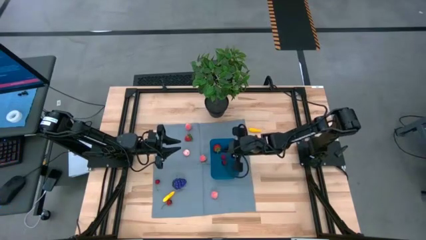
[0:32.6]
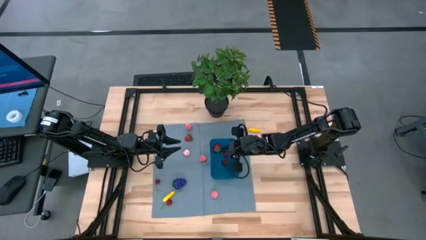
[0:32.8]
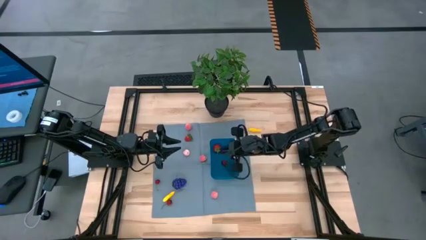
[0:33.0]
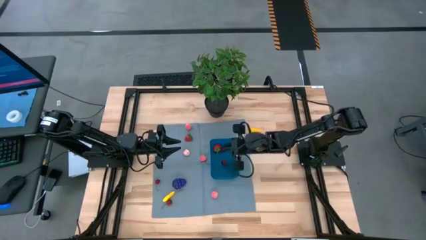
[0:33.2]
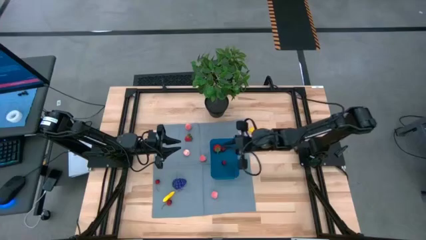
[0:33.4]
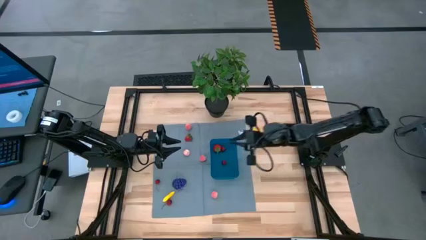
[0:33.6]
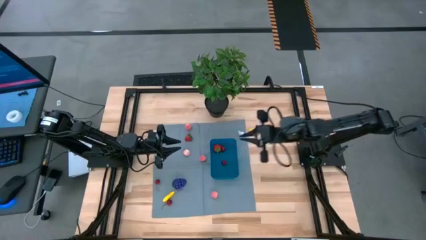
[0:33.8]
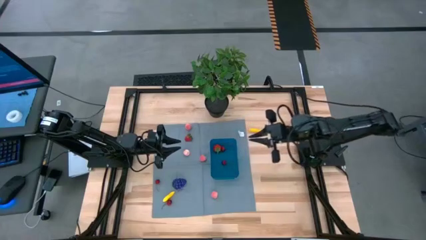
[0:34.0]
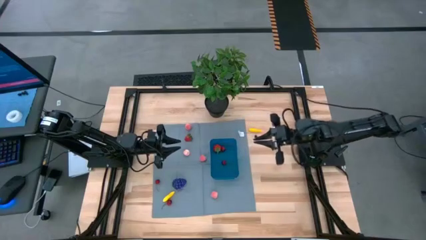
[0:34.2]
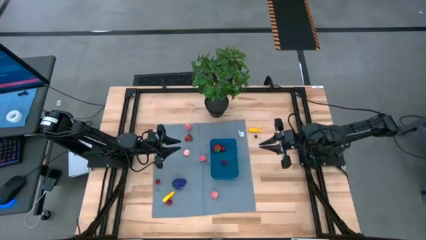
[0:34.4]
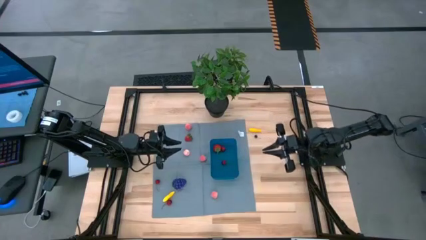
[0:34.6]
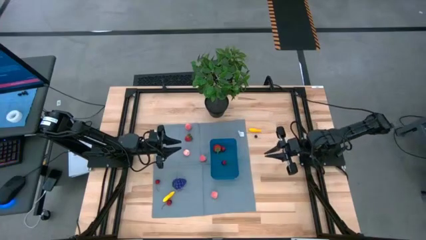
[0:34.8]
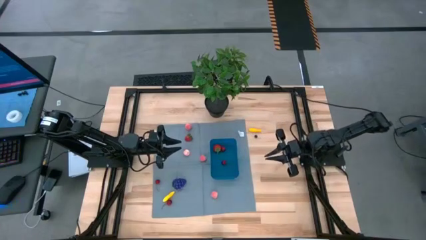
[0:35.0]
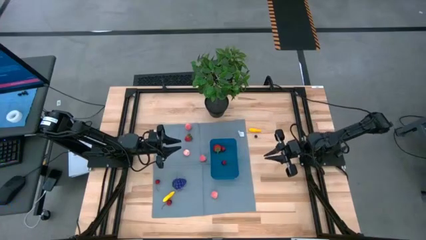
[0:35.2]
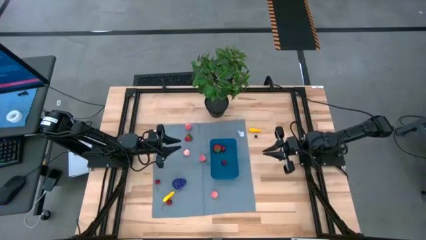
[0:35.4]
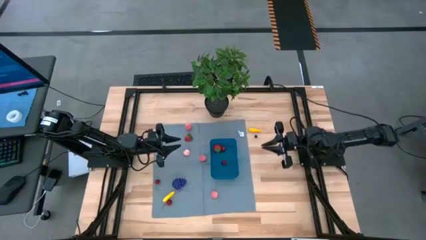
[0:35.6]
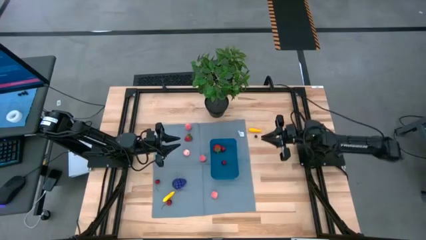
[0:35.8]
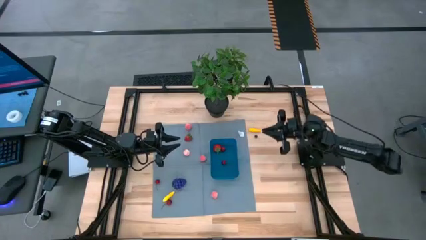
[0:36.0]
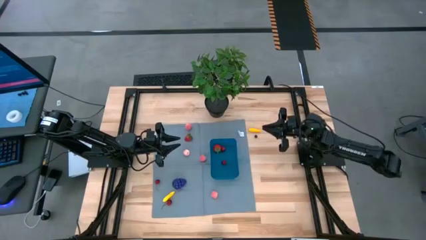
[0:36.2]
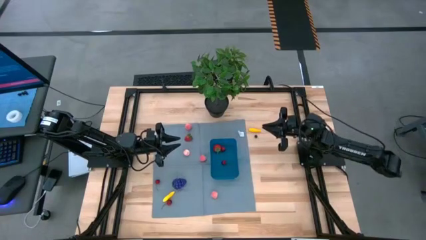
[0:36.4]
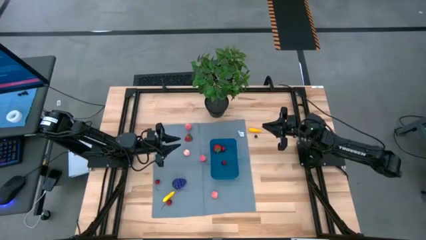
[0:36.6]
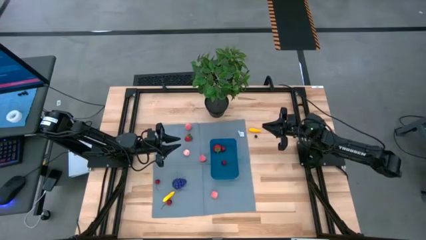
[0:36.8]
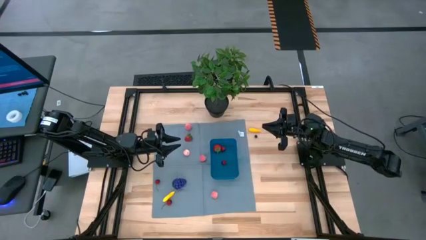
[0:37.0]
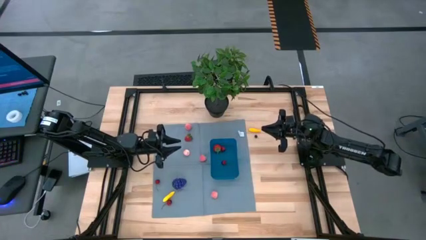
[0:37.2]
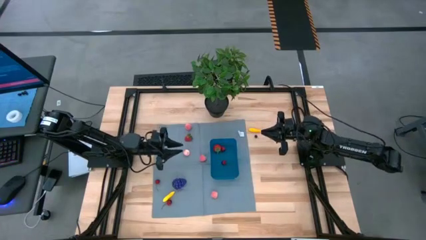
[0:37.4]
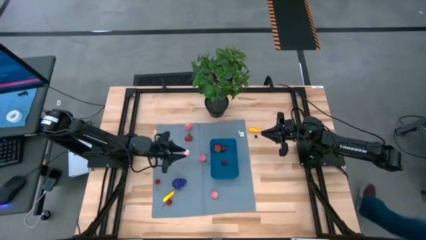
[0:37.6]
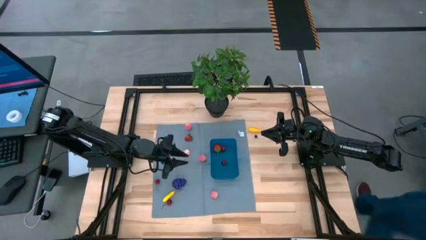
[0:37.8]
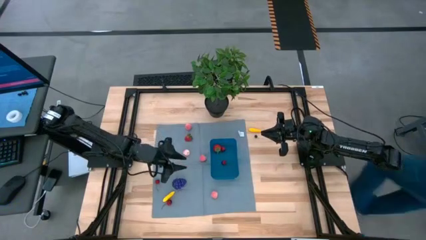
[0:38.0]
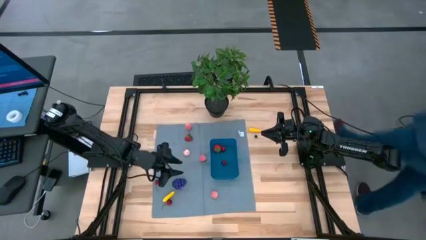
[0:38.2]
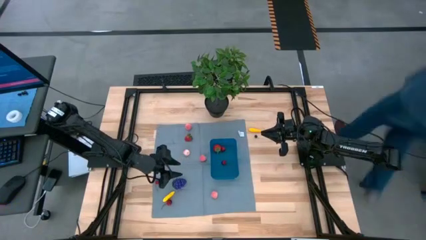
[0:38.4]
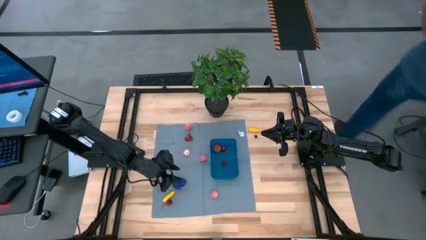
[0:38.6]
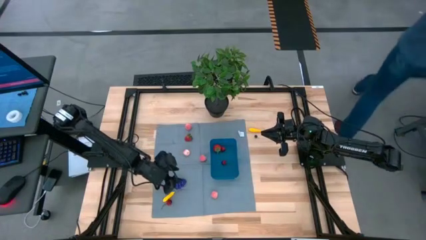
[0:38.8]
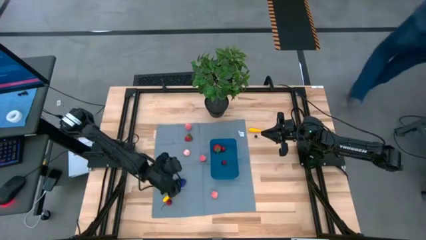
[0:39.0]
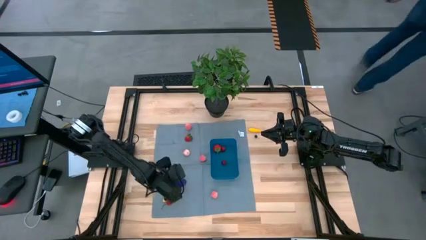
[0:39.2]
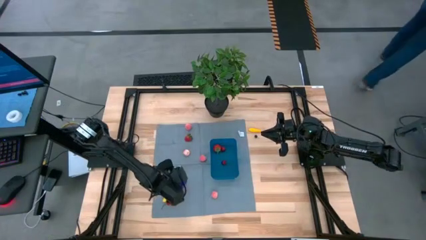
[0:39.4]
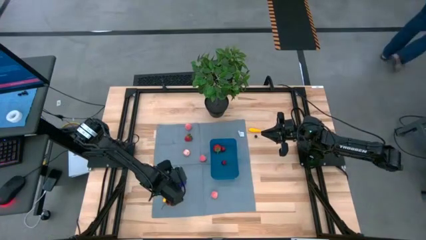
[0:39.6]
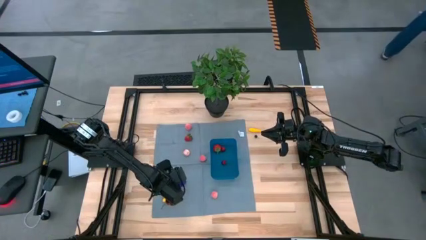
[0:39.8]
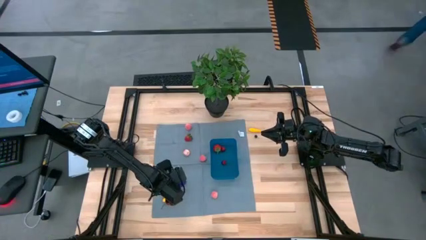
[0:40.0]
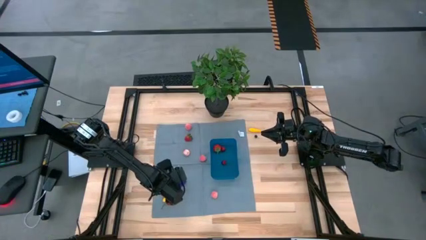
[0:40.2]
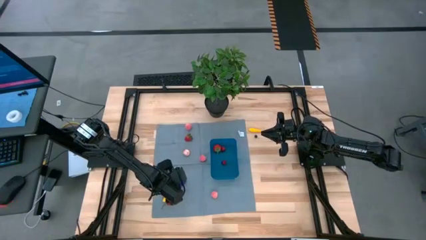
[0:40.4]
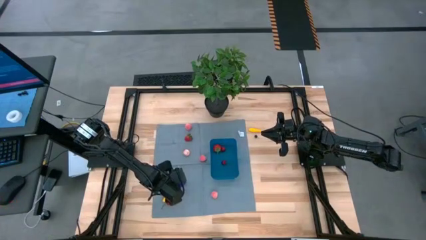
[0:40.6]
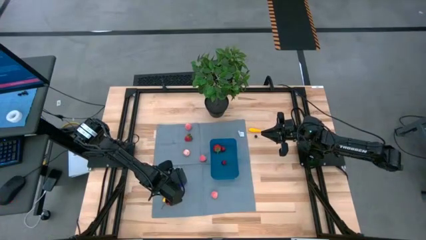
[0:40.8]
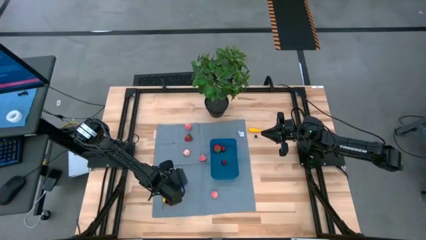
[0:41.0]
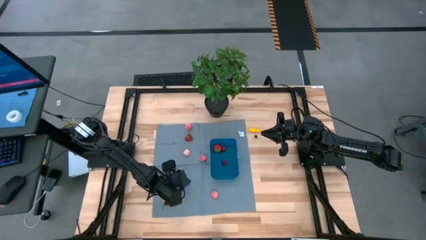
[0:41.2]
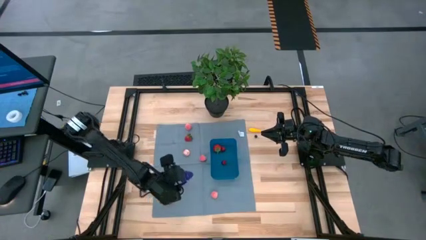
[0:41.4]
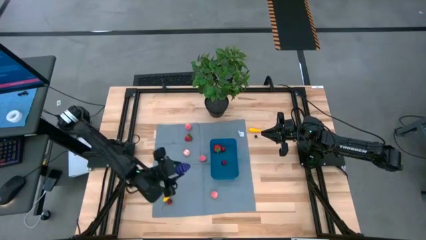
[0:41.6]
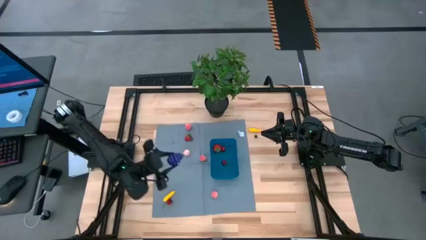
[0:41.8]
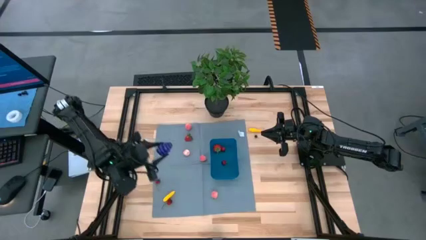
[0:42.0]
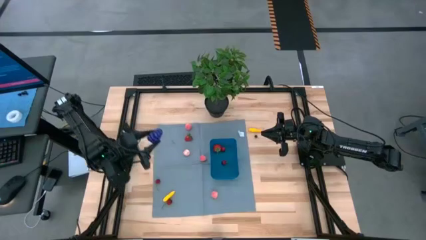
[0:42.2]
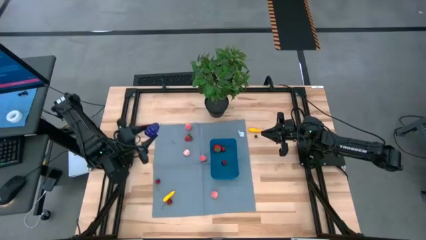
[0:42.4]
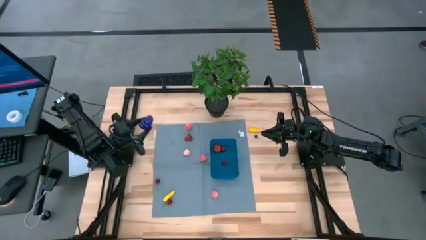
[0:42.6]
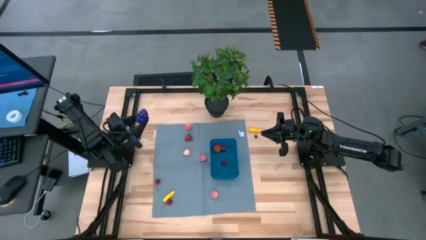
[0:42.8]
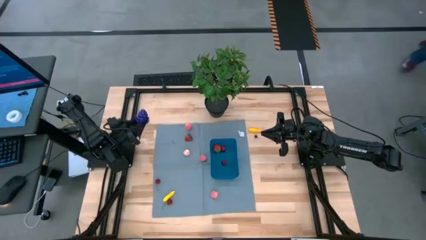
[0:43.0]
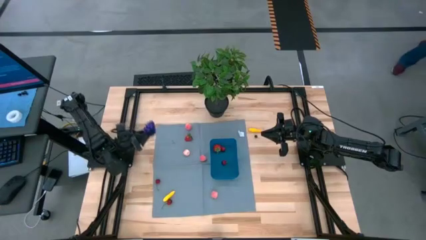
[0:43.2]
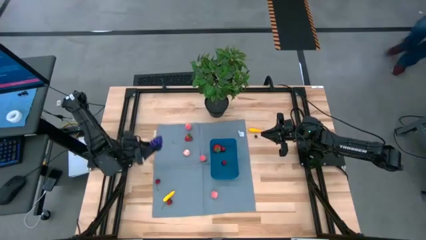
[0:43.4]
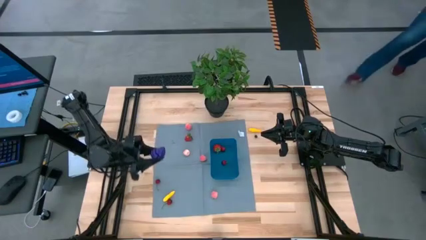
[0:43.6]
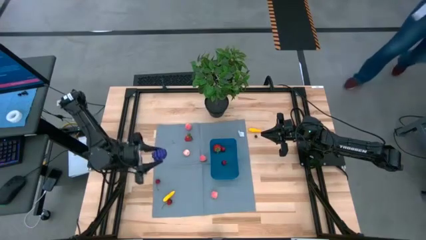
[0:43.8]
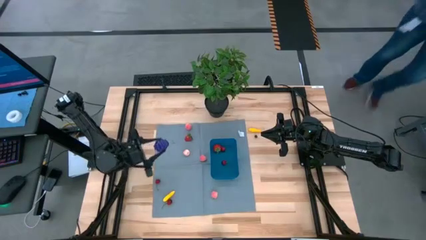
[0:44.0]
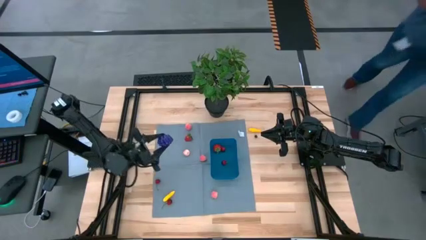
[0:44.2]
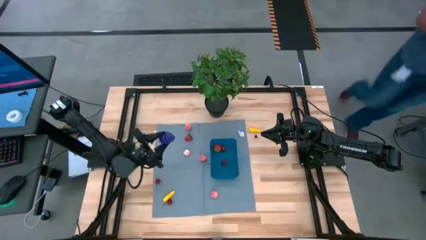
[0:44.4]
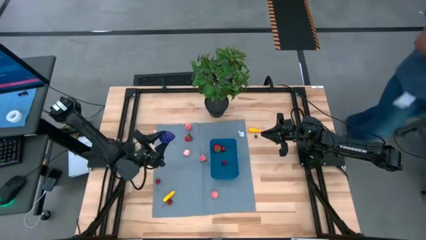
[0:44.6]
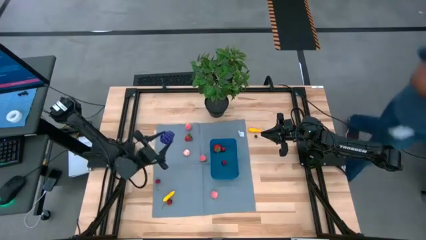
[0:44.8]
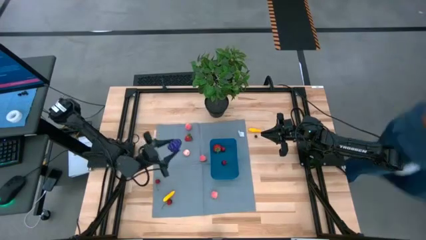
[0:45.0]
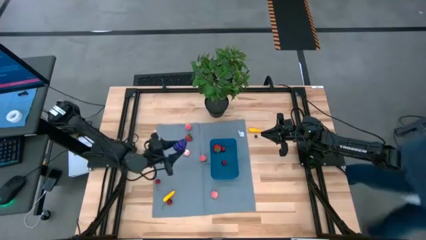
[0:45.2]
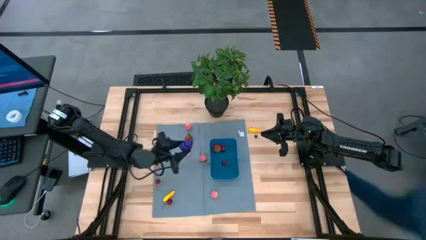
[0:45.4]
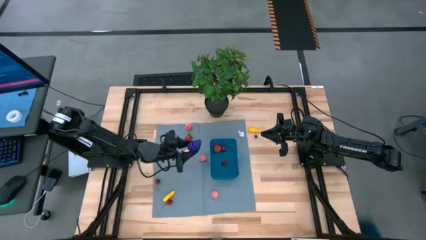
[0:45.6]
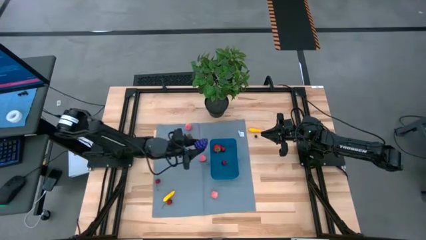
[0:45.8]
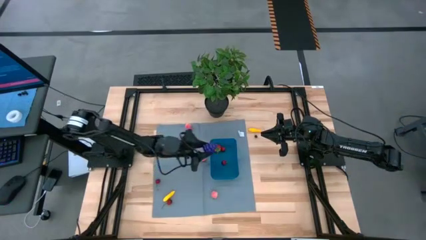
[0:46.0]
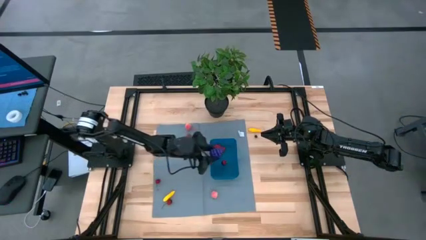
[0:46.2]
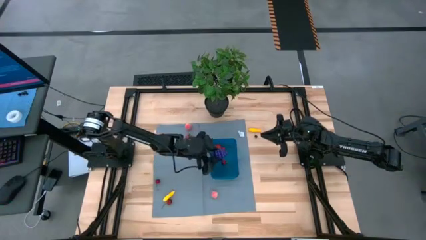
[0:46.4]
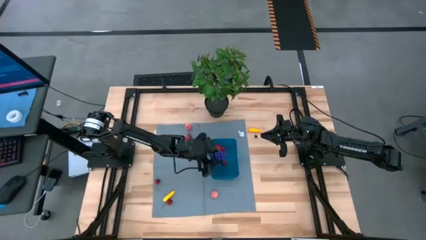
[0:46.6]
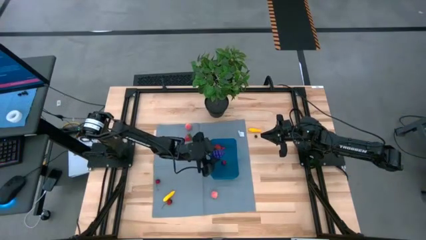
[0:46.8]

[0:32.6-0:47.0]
Task: Pick and placing Produce into tupperware
Put the grapes into the bin
